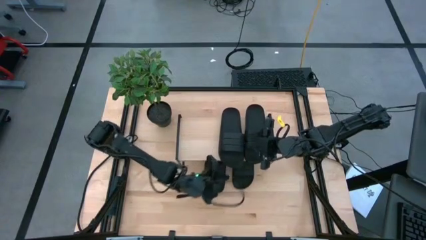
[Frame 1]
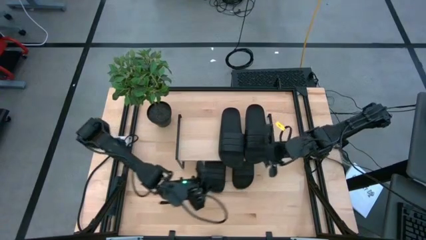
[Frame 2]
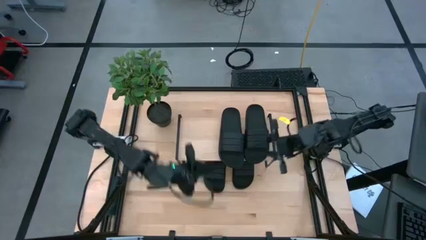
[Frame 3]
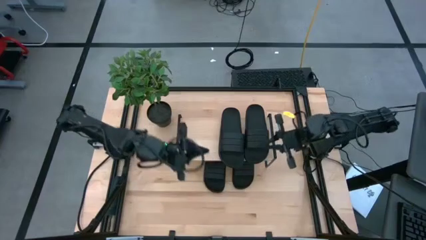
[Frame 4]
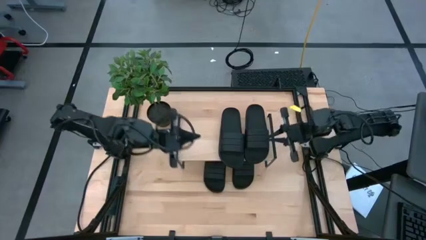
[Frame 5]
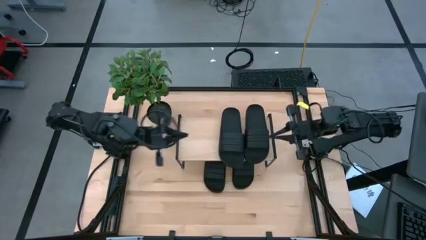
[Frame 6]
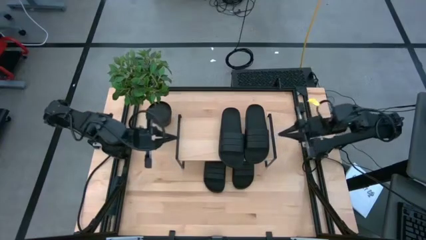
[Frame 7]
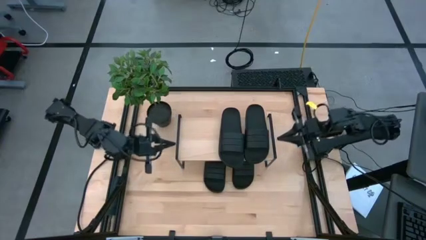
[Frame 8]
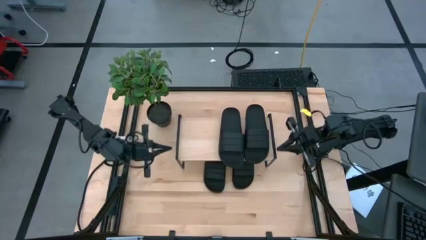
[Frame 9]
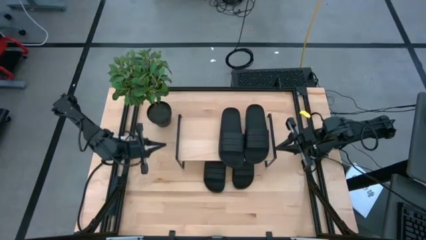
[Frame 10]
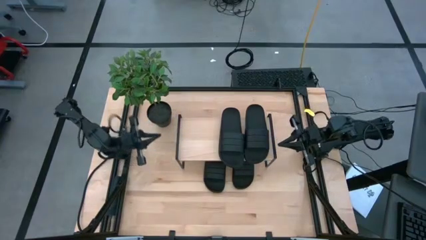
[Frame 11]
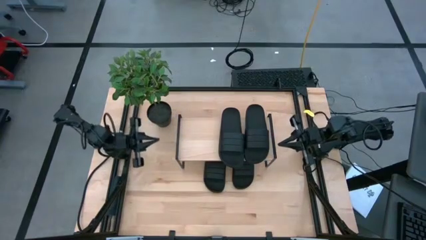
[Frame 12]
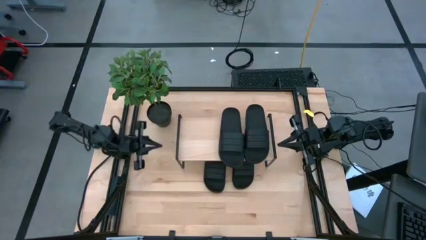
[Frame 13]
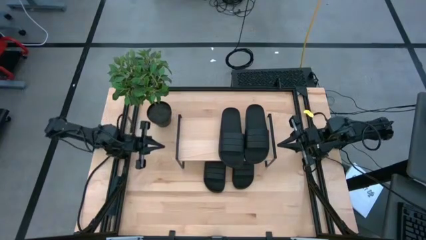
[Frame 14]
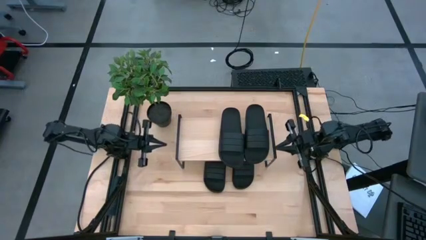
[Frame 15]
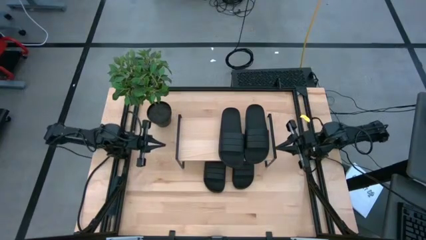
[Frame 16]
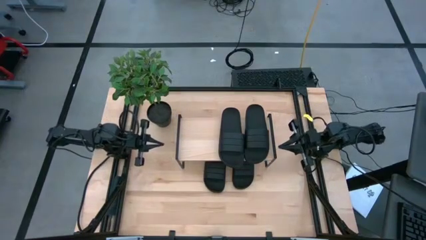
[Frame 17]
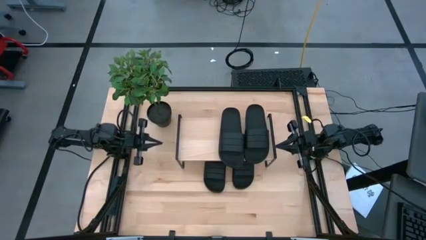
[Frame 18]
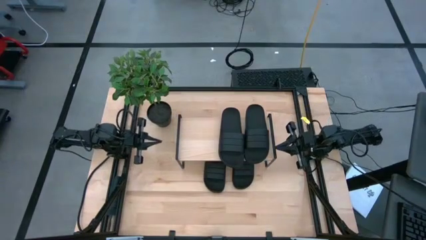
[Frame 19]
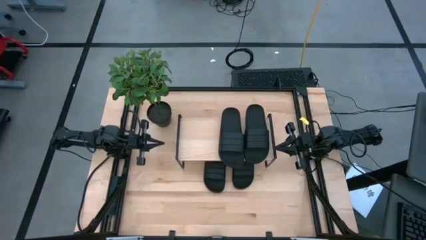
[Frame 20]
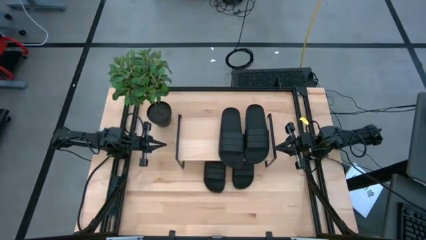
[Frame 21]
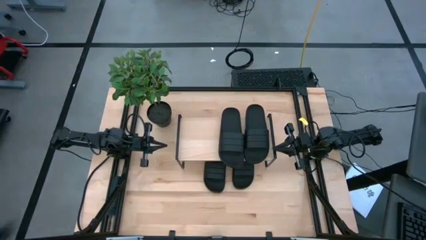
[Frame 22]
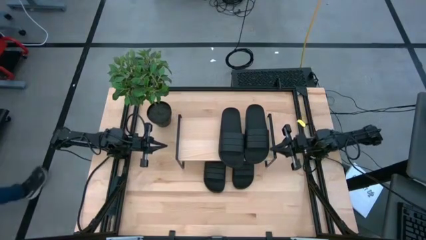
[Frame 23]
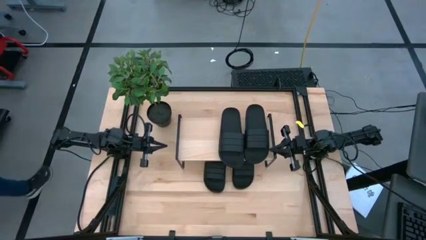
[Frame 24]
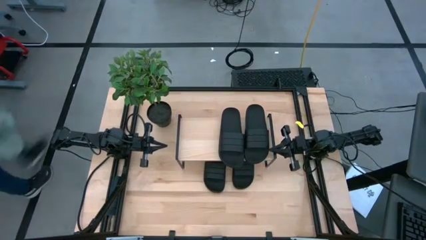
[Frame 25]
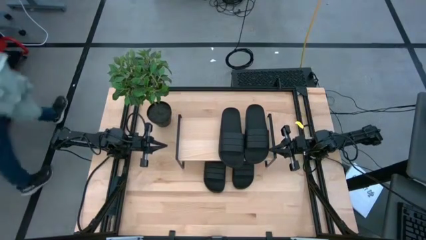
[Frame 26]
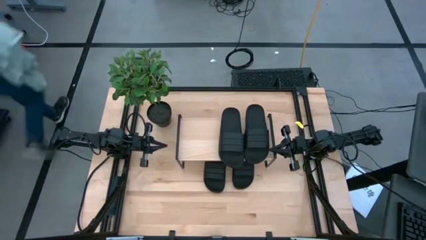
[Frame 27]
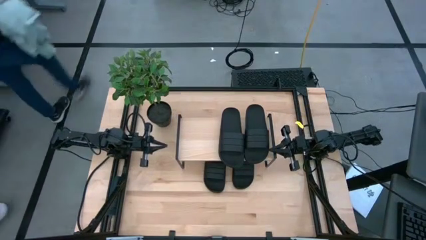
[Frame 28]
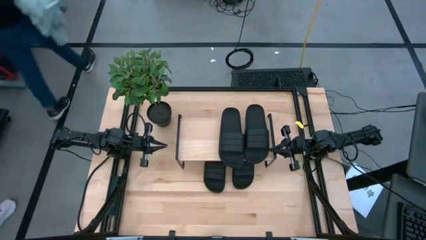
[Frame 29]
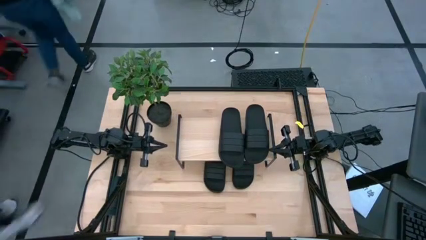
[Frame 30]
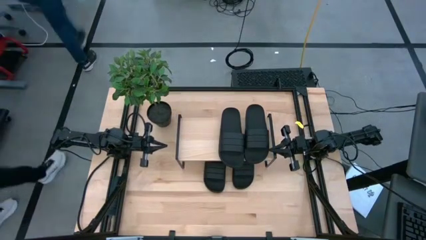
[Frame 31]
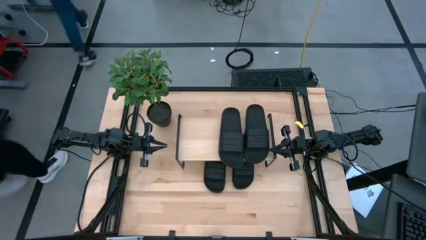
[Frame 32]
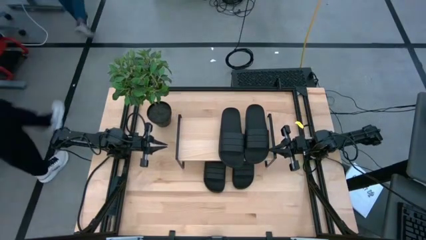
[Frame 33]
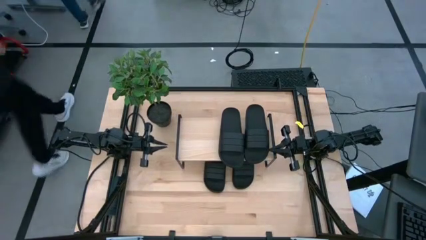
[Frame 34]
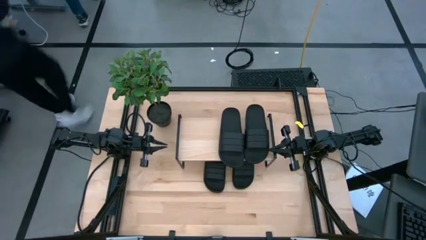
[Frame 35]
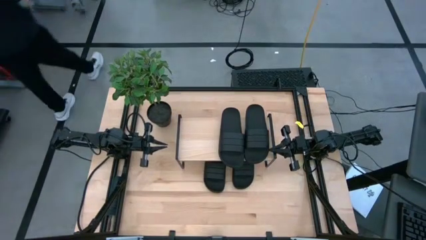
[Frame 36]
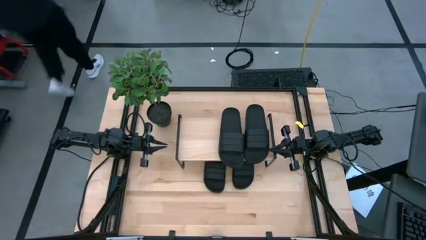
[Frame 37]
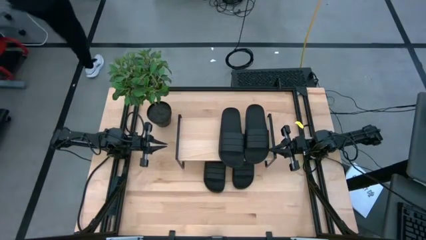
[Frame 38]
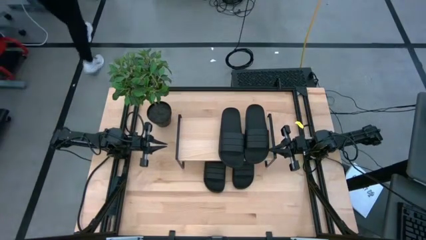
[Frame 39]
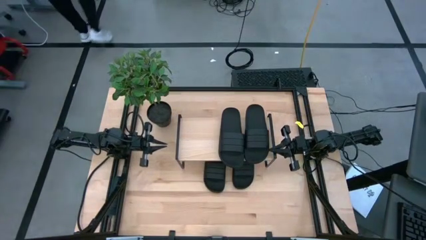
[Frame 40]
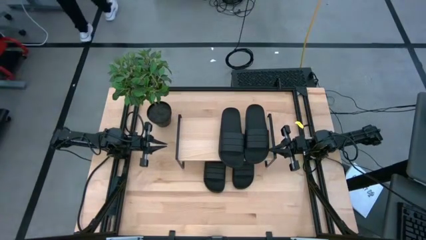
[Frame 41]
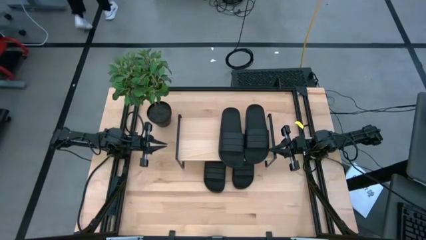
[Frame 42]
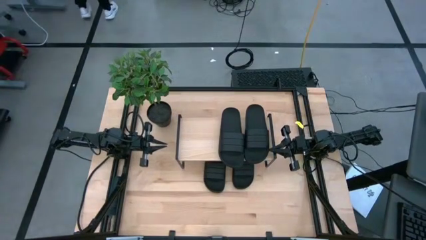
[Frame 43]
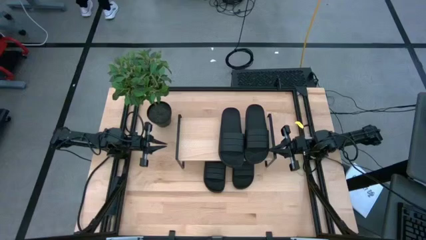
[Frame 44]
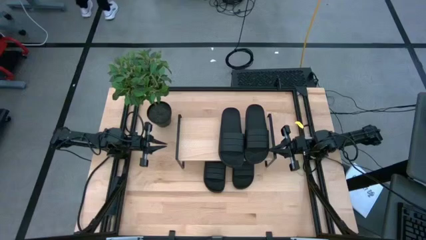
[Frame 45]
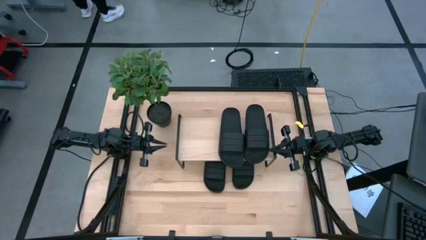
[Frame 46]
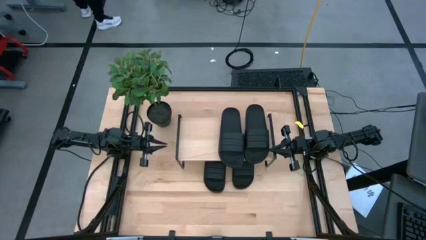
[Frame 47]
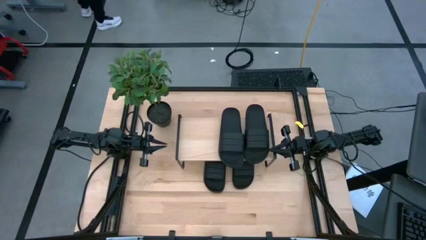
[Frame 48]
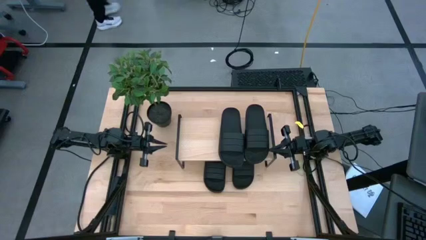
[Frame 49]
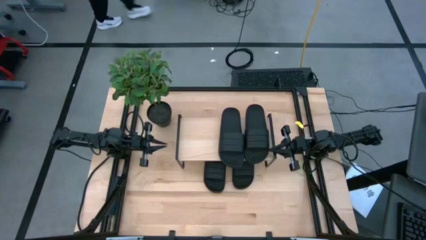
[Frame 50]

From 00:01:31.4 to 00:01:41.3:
Task: Pick and place slides into the shelf
Return to Home Position

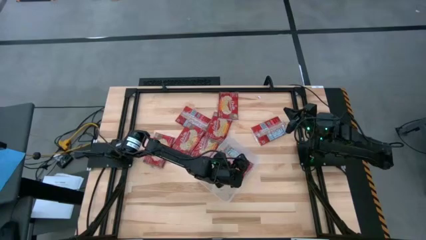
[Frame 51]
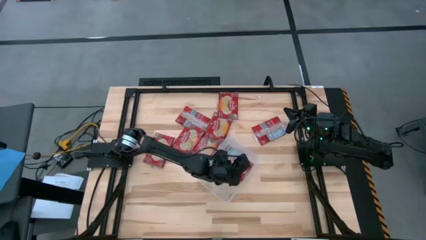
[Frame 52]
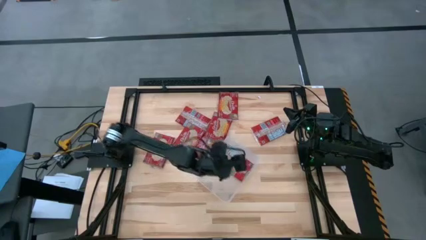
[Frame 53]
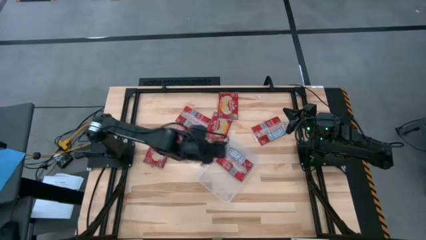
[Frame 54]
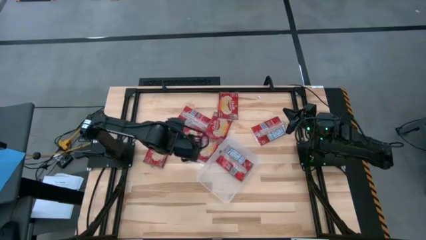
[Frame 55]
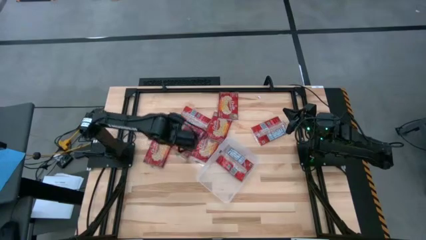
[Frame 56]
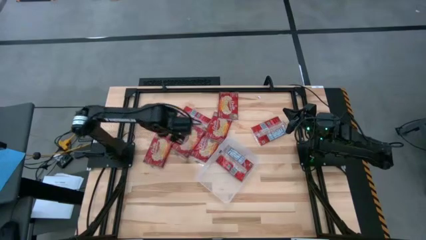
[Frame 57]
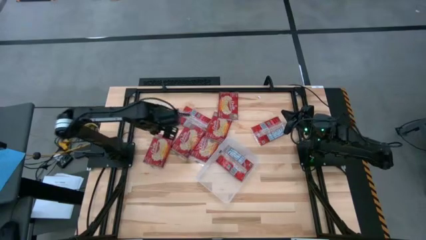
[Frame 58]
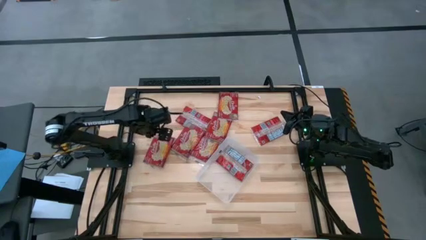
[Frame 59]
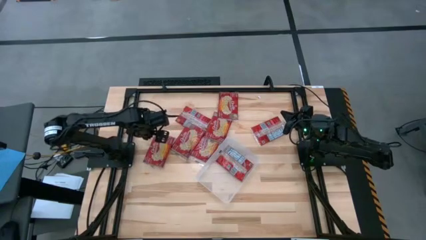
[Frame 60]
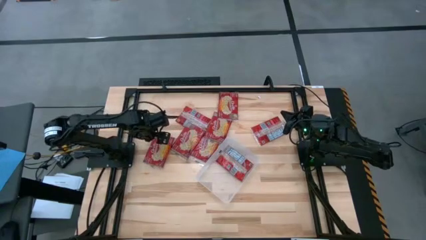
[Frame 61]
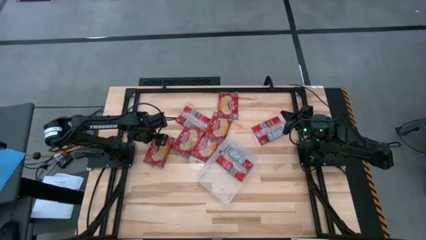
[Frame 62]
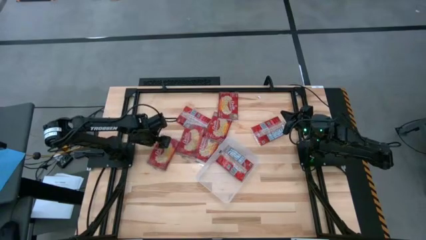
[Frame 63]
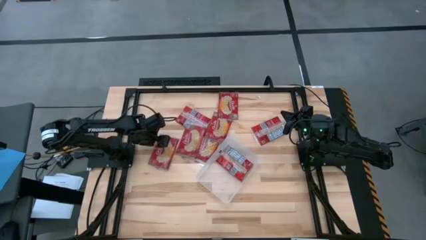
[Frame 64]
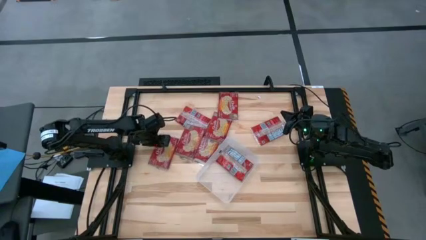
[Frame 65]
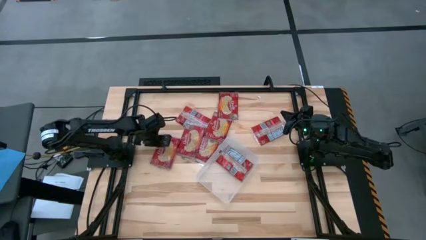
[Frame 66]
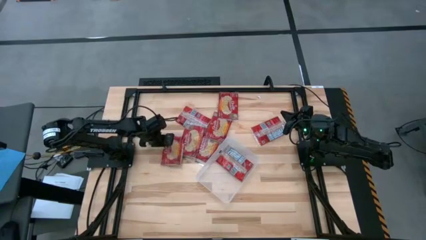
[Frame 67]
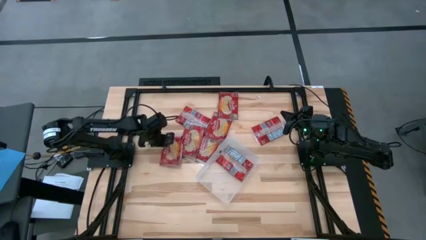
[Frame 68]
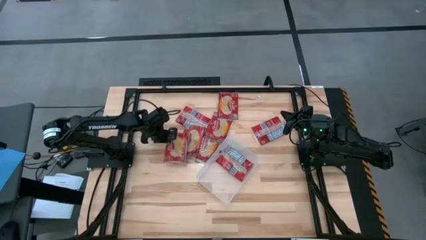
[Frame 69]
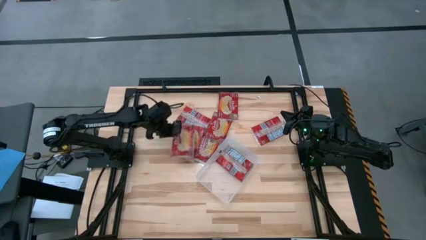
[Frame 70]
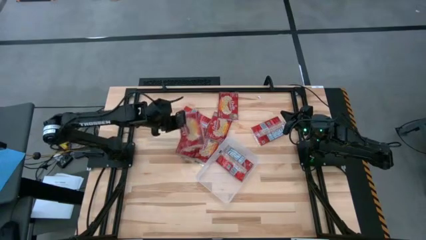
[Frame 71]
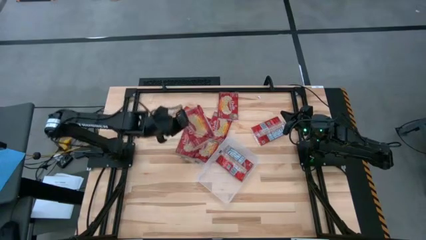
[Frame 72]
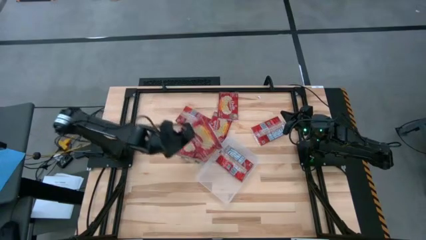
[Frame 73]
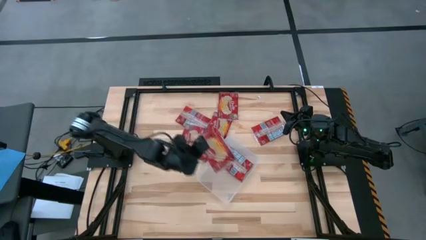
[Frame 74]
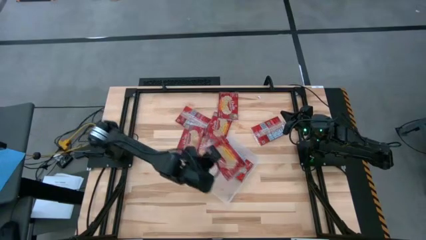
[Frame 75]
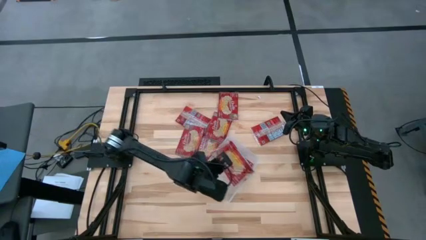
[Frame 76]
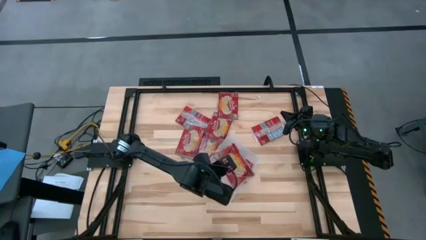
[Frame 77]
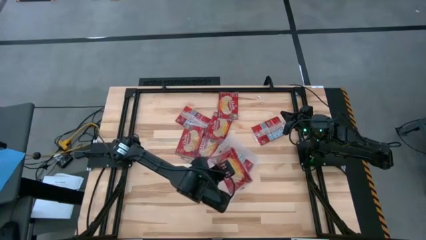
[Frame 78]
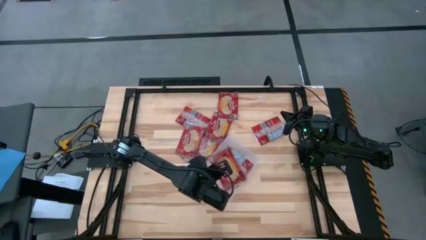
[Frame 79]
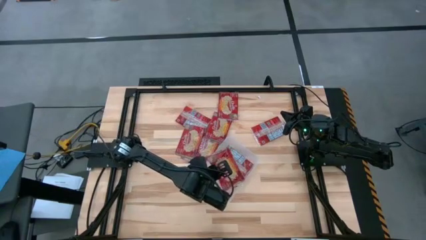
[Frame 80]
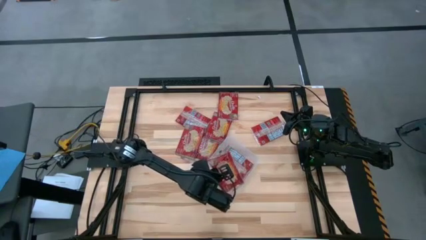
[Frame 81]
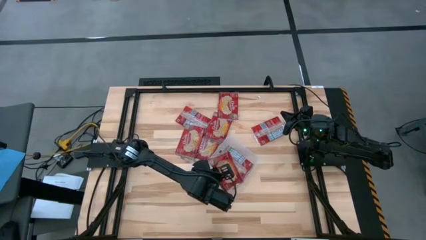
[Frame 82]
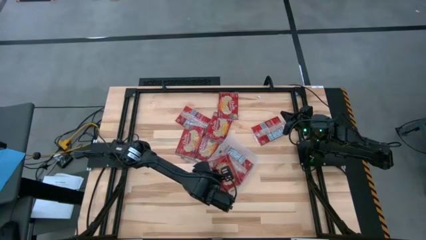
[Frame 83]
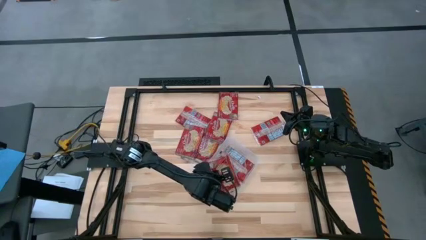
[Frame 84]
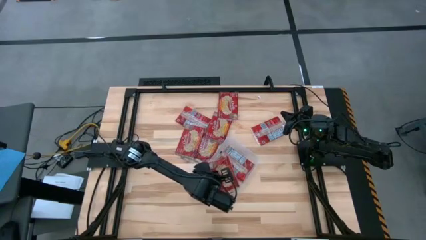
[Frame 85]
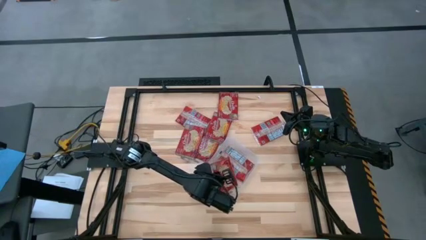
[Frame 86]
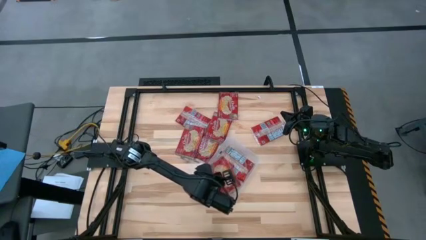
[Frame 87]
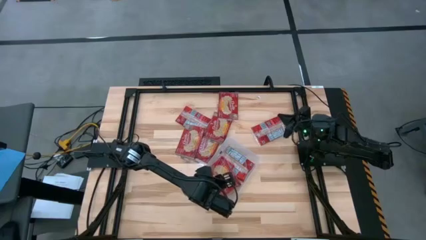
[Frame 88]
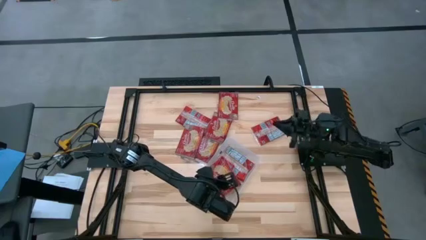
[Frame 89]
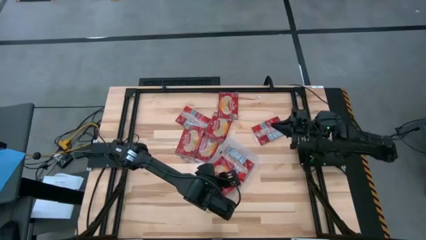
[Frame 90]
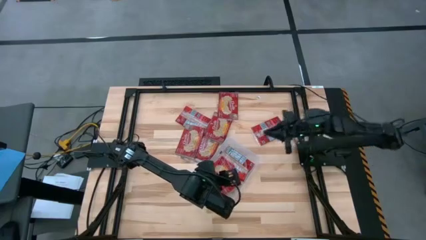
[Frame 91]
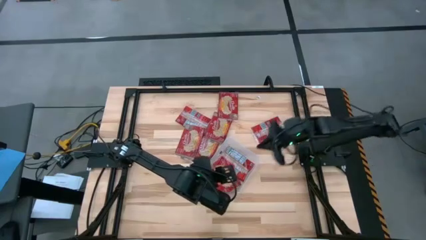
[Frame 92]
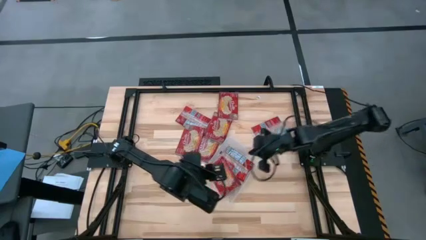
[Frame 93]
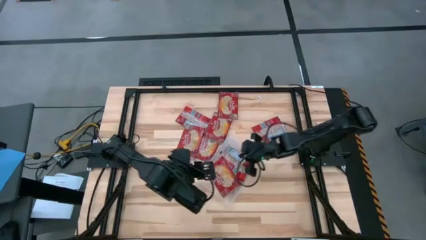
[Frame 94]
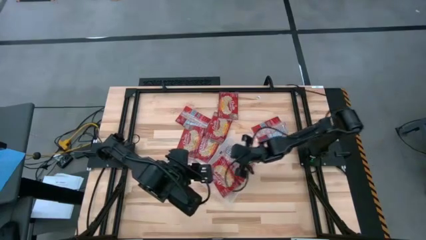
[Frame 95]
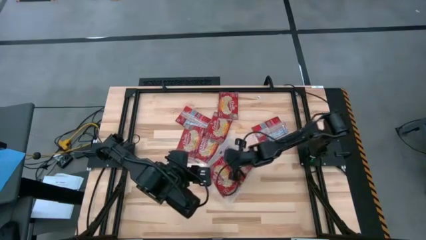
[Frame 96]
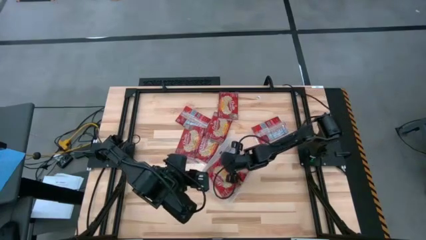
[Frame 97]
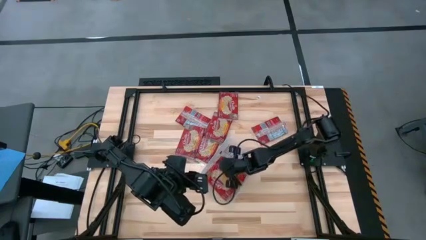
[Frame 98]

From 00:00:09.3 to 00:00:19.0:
Task: Sort popcorn bags into baskets
Put the red popcorn bag into the transparent bin
